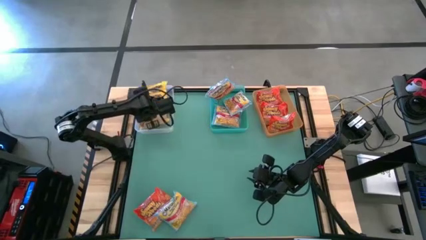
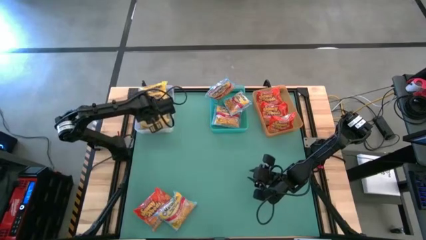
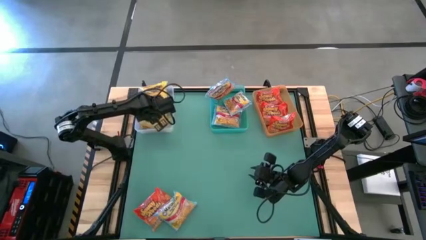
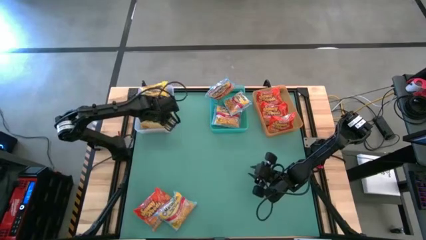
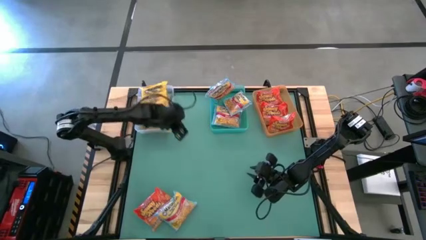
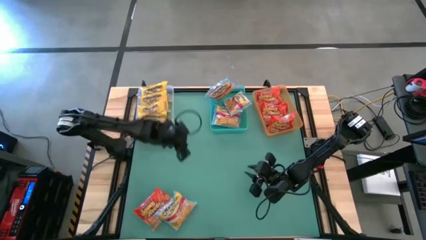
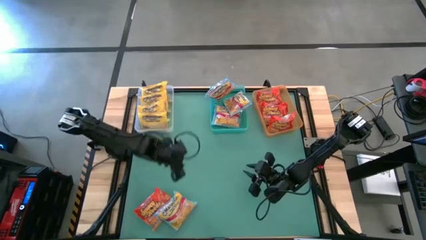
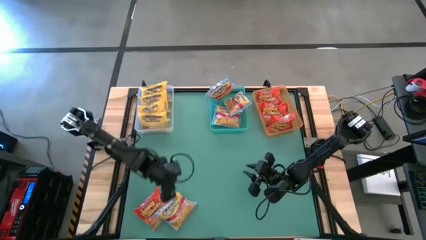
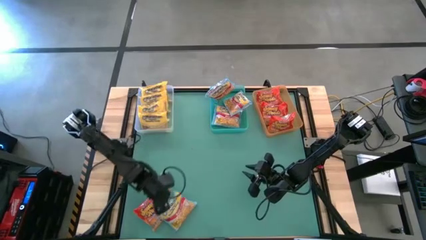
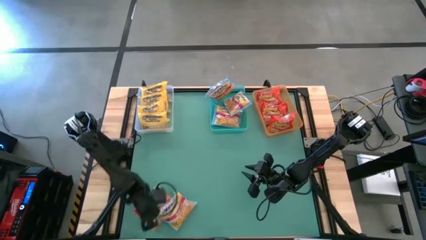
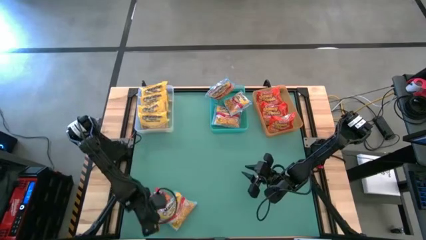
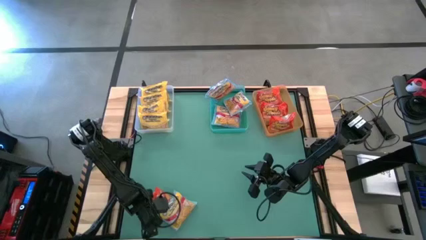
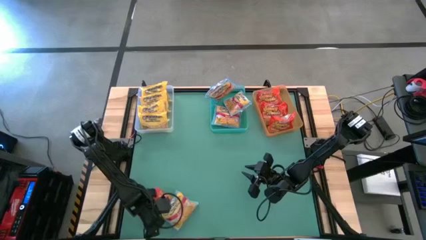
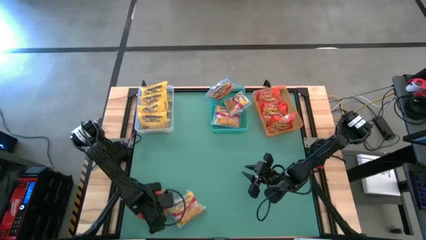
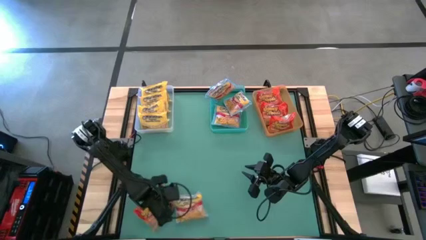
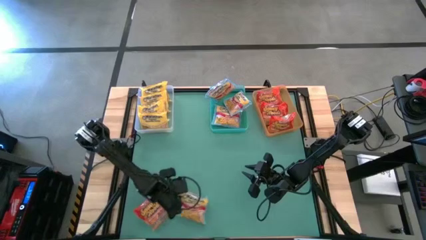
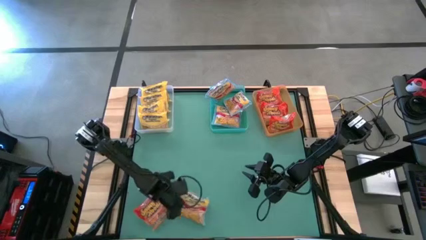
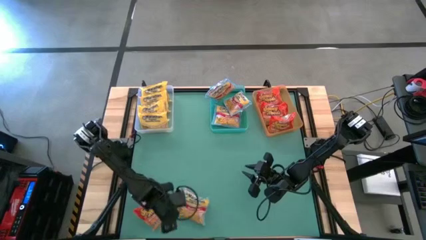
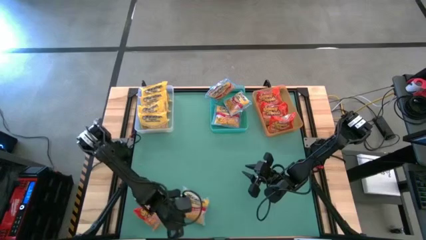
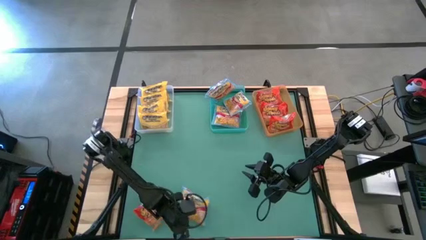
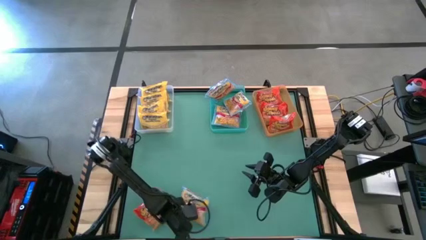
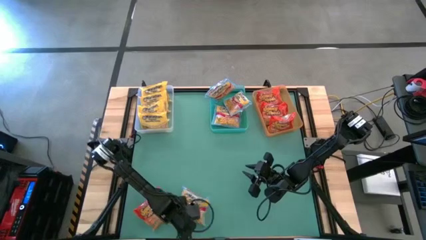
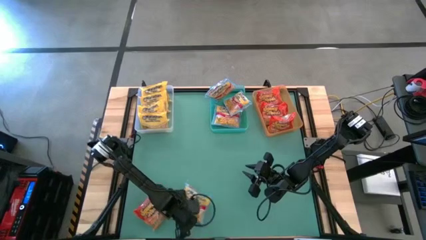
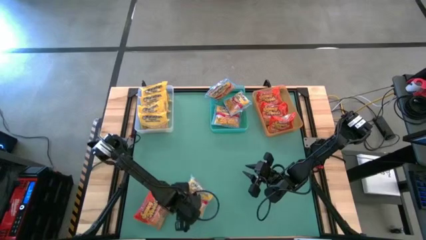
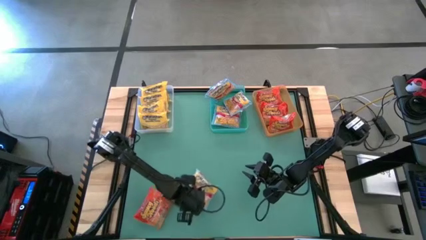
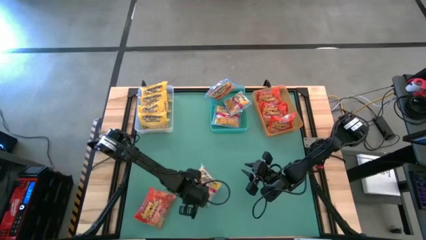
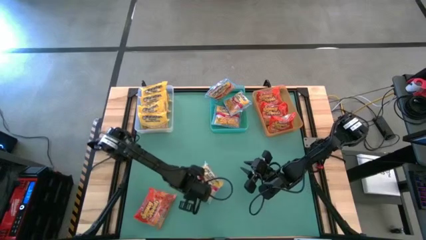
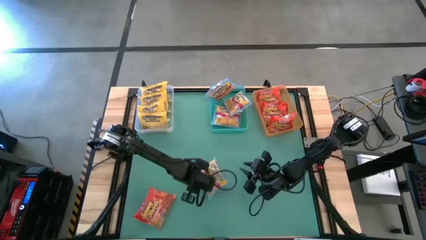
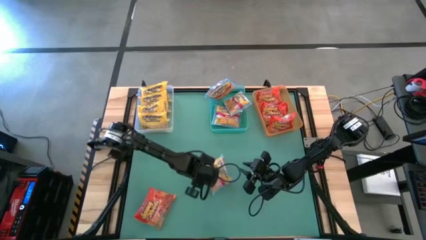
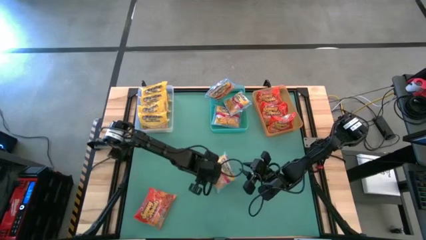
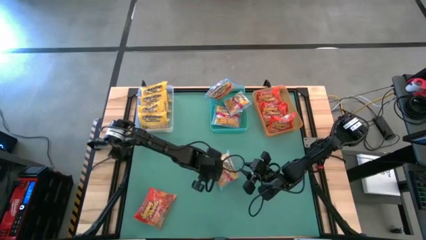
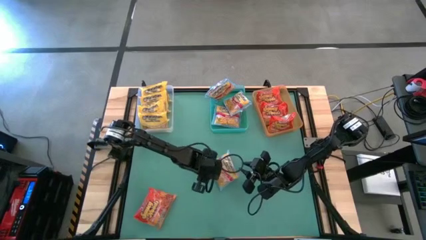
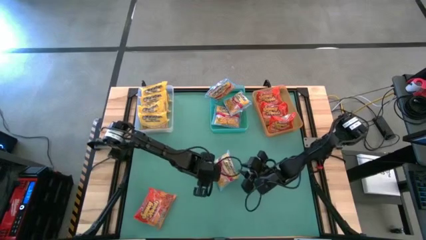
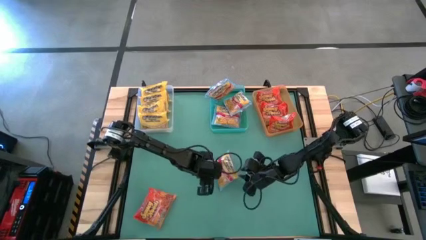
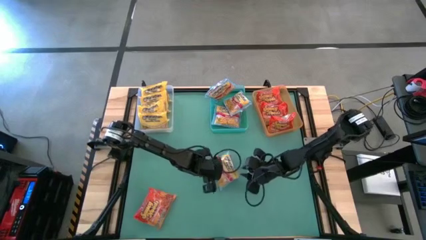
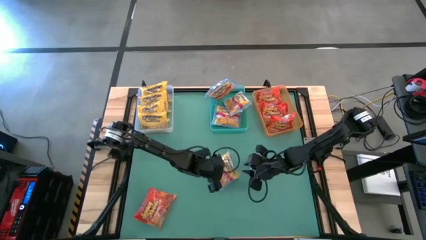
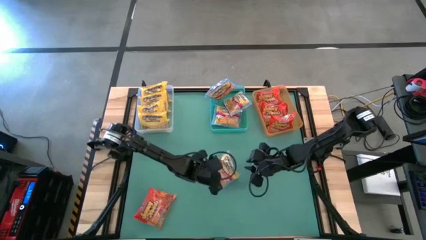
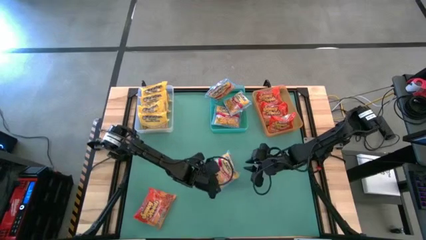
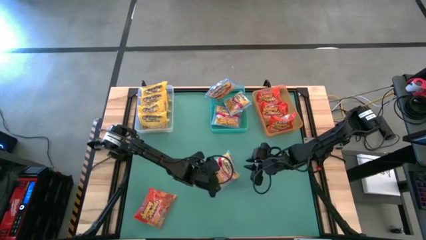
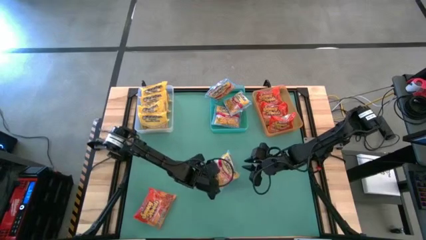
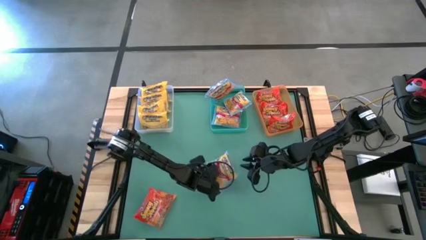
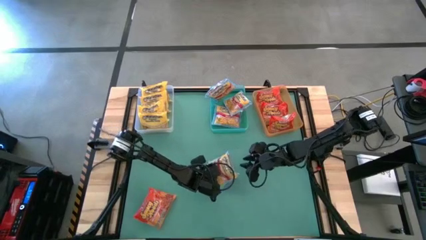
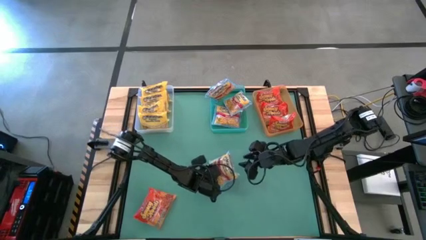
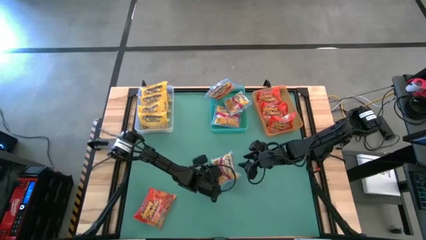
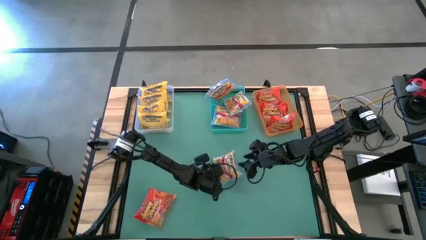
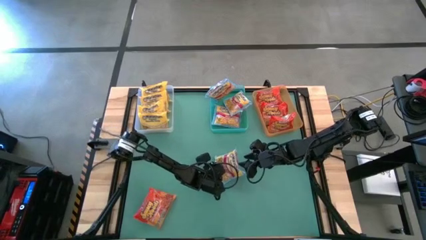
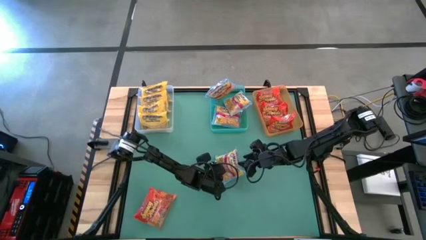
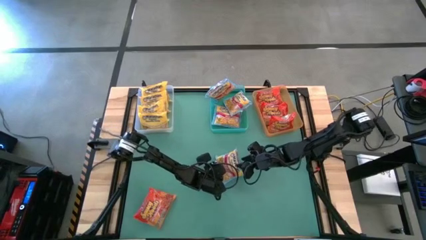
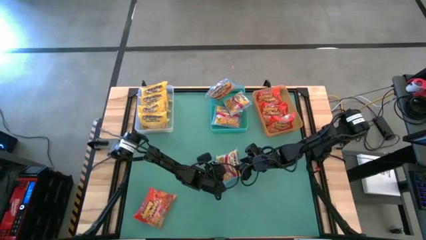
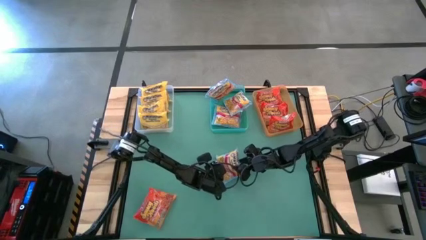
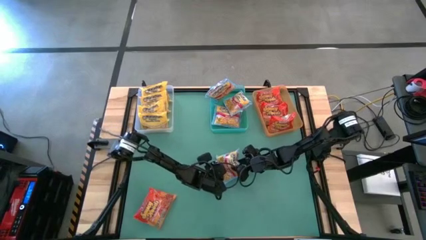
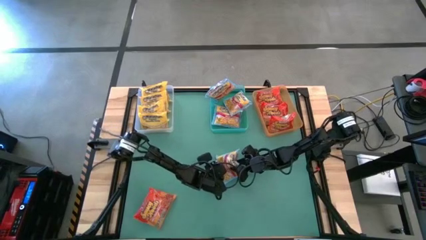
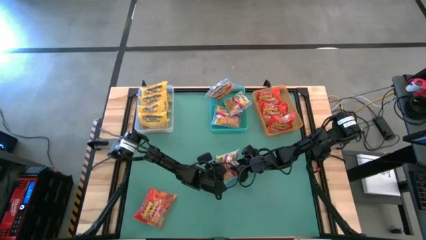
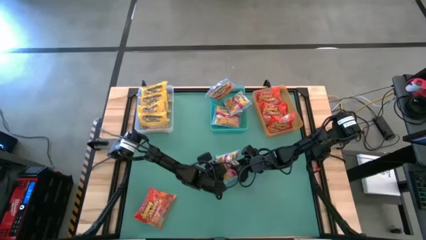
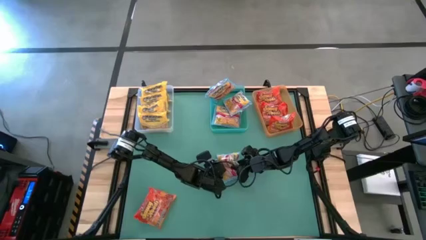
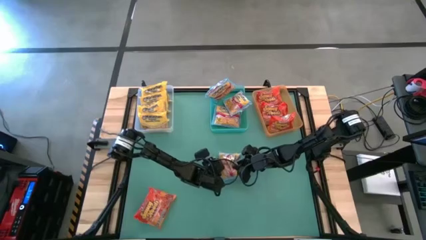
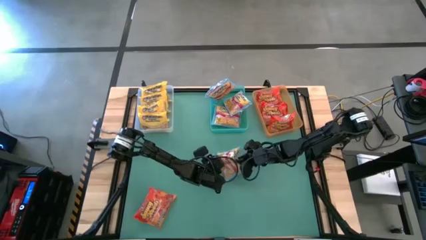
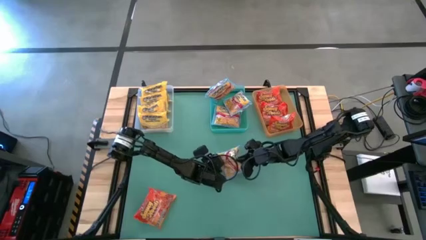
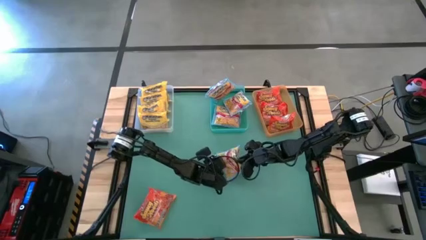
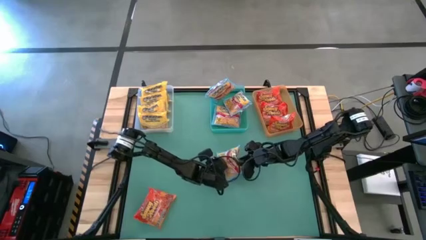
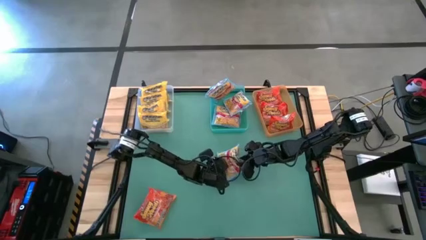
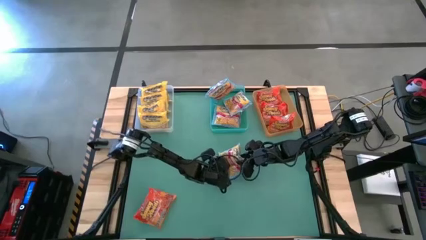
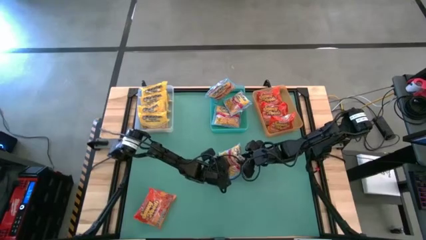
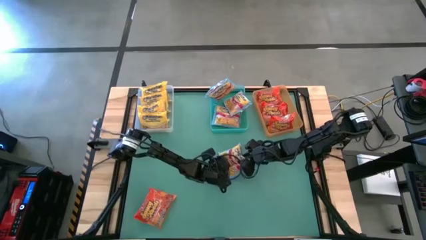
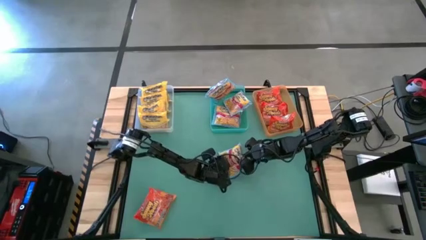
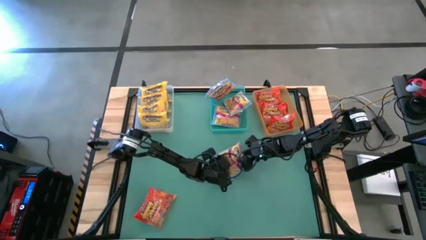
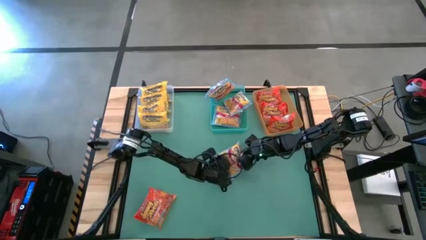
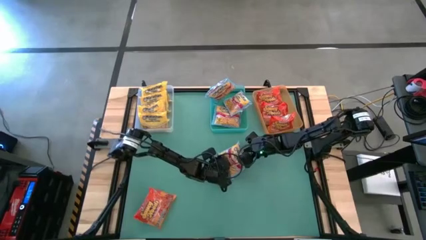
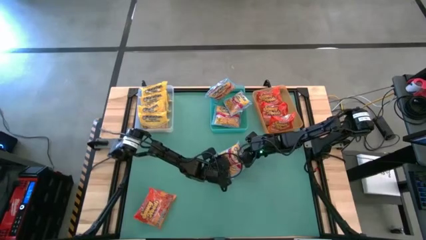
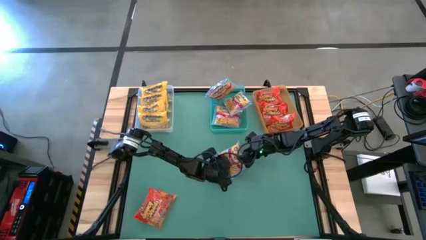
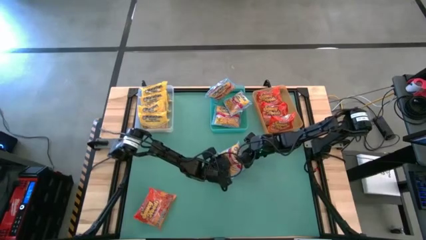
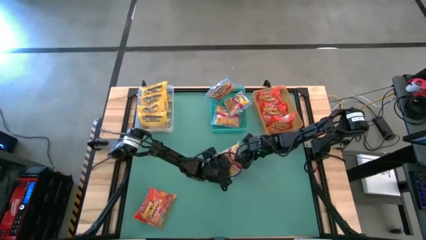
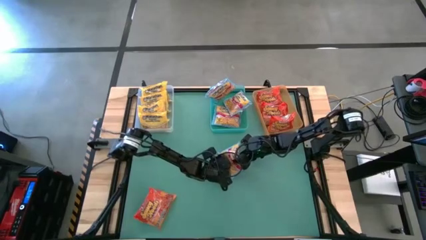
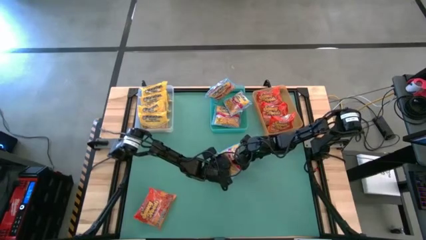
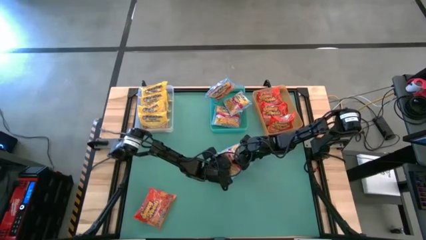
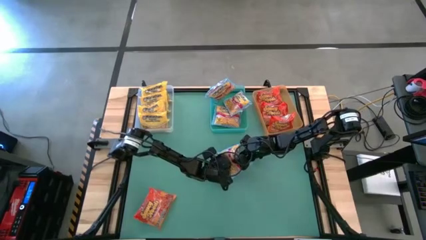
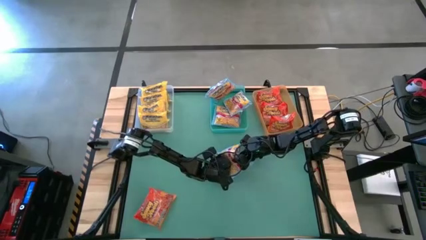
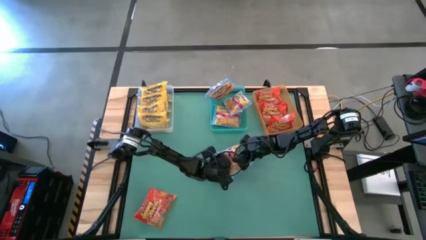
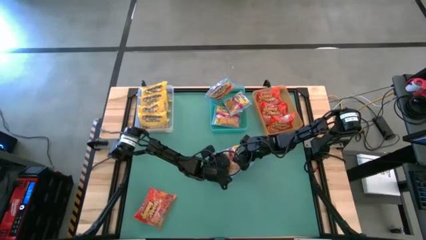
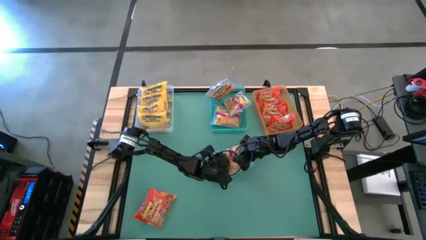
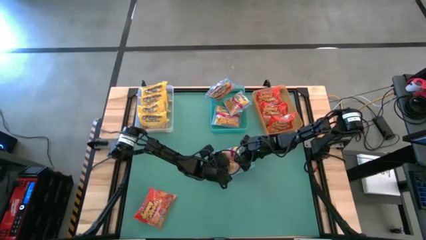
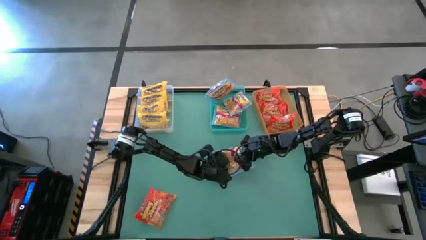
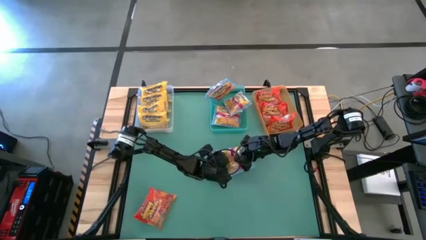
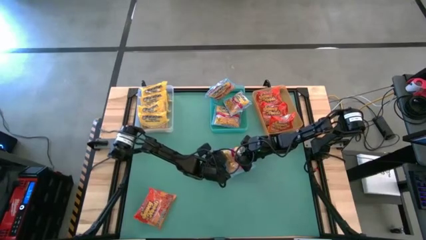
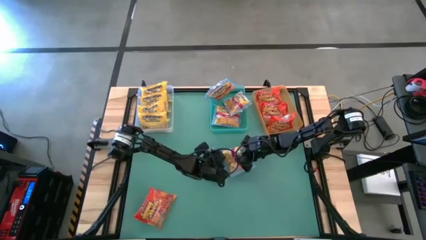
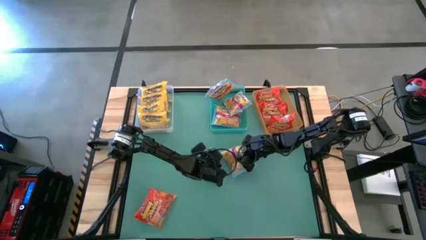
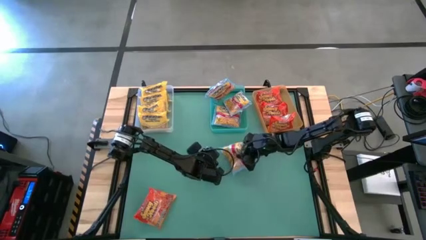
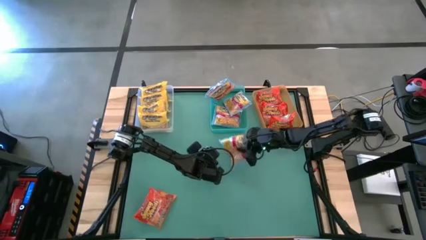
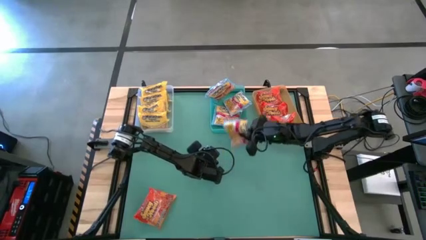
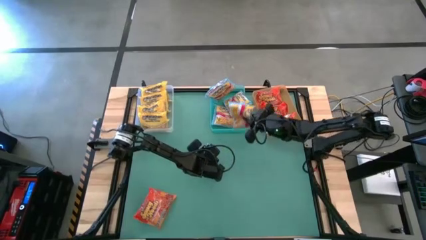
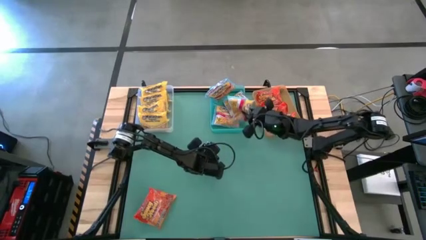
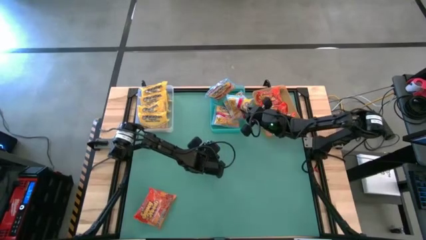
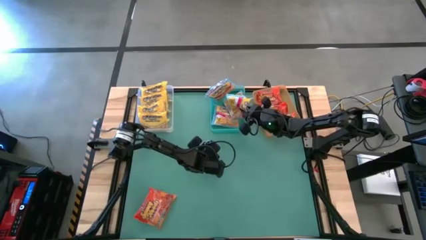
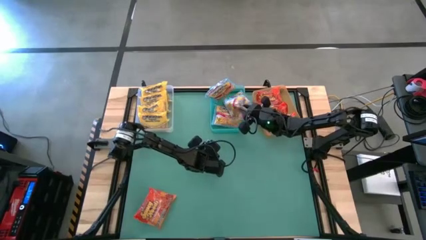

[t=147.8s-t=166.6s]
Task: Sort Maruchan noodles
Put the blue noodle pack into the green bin
